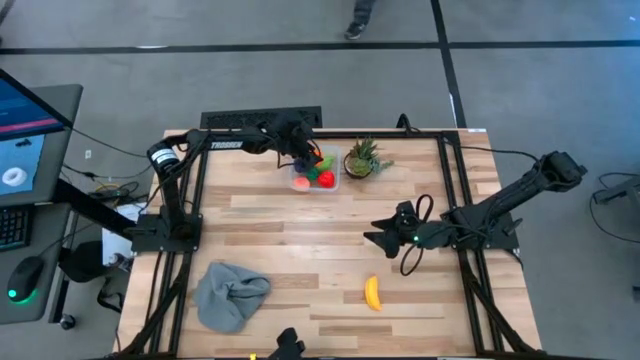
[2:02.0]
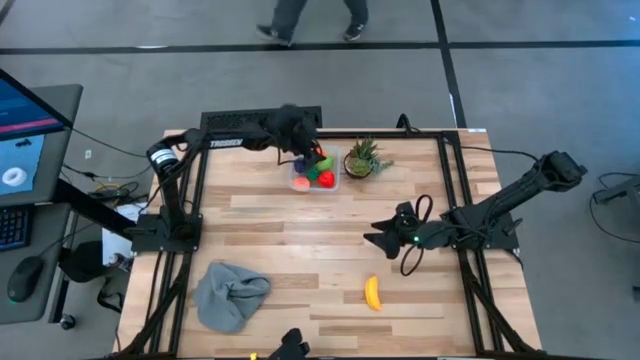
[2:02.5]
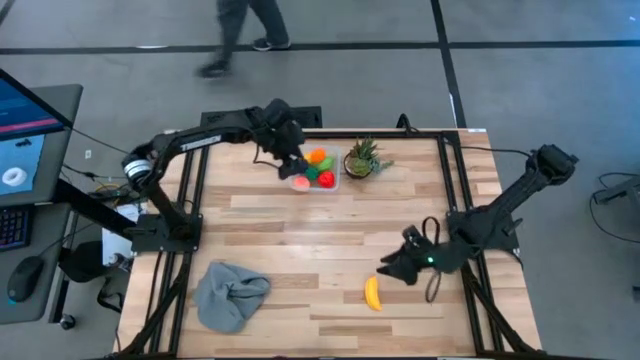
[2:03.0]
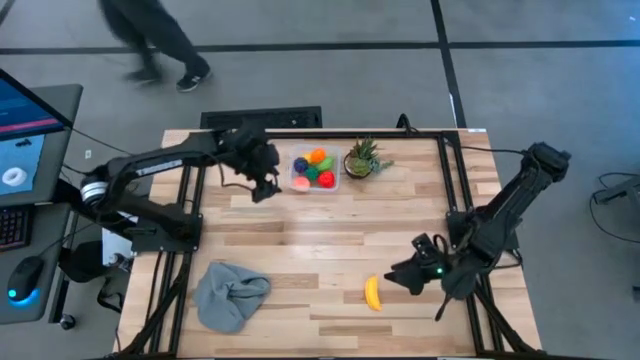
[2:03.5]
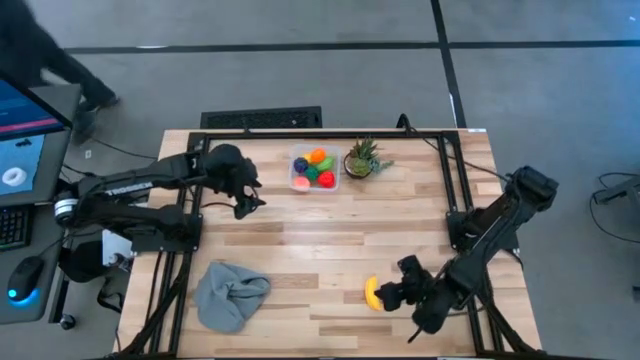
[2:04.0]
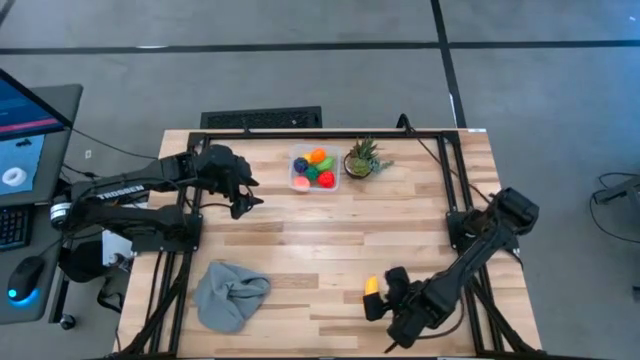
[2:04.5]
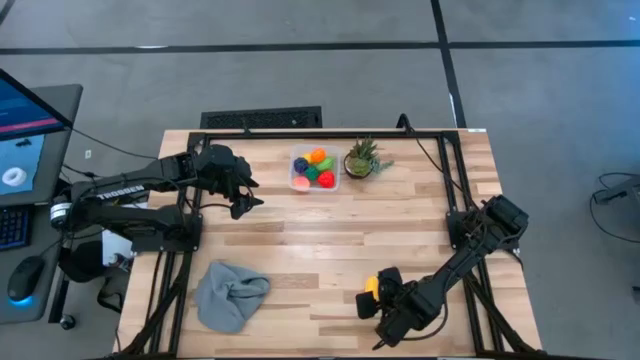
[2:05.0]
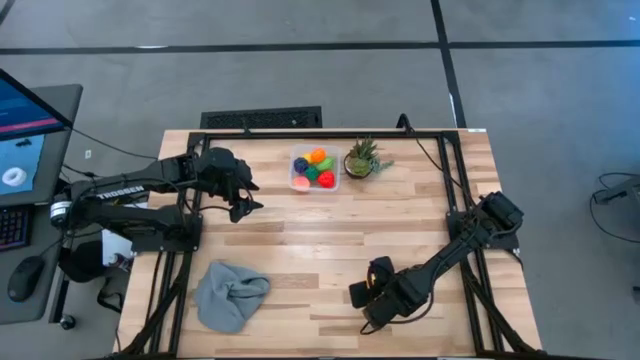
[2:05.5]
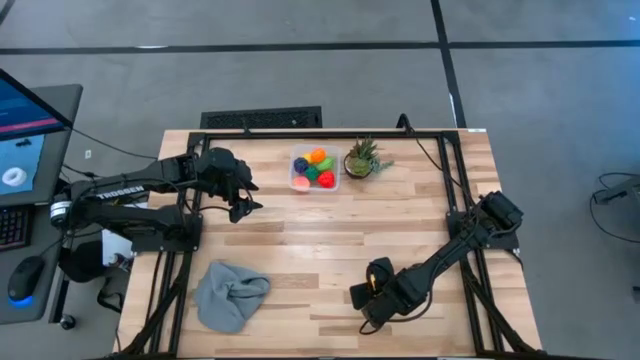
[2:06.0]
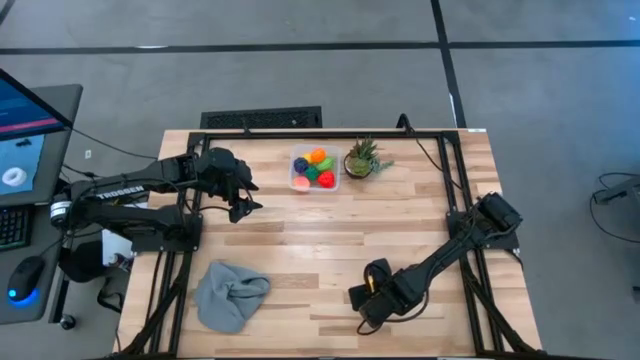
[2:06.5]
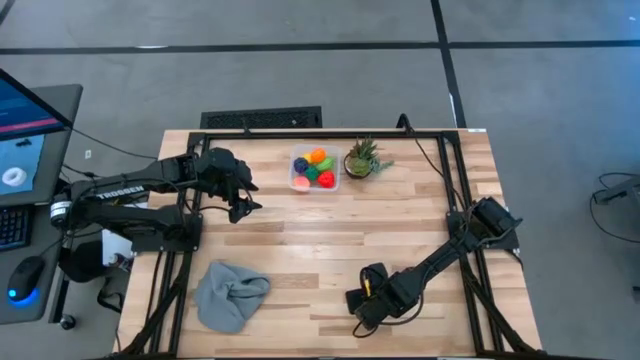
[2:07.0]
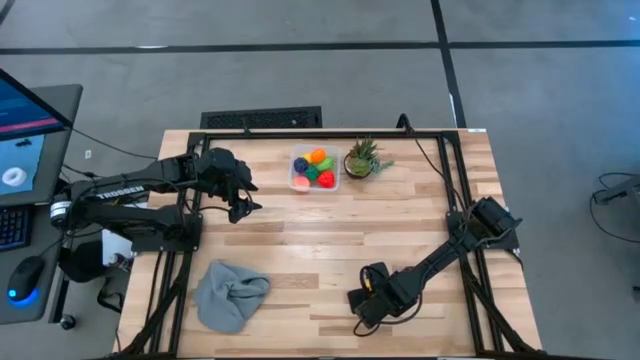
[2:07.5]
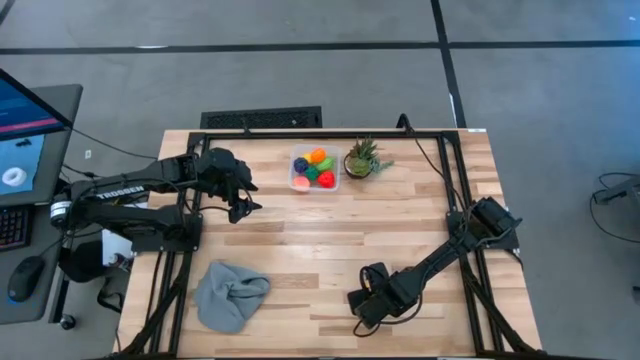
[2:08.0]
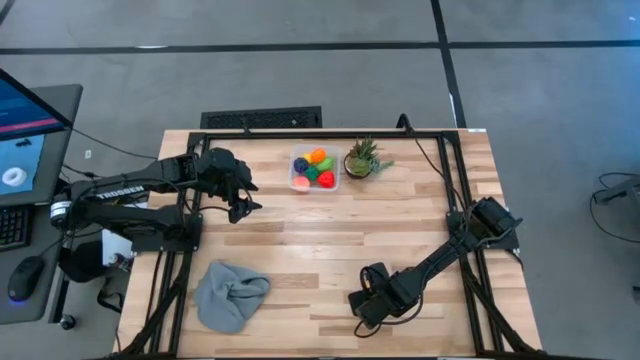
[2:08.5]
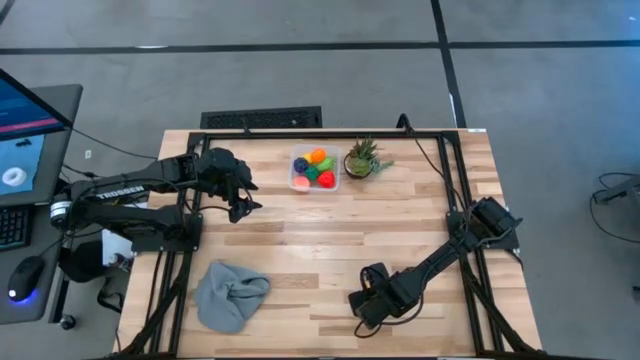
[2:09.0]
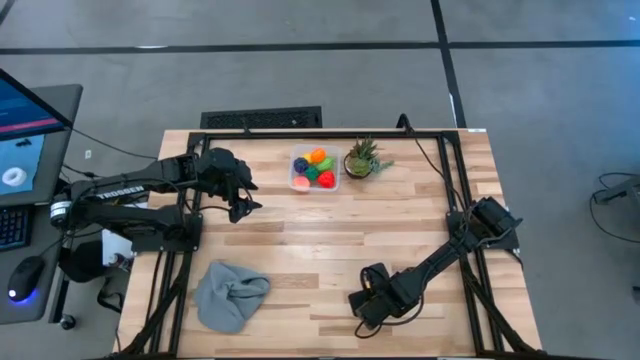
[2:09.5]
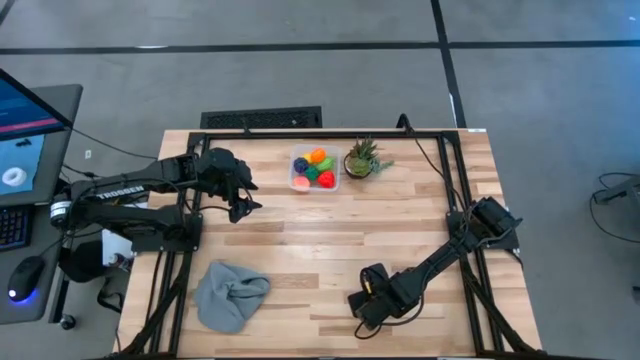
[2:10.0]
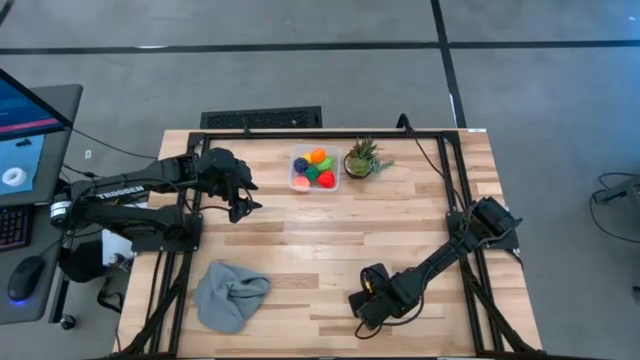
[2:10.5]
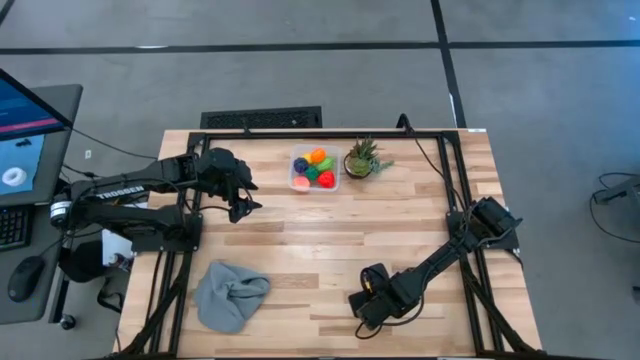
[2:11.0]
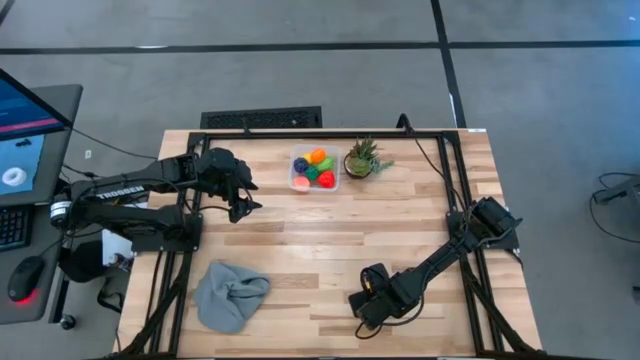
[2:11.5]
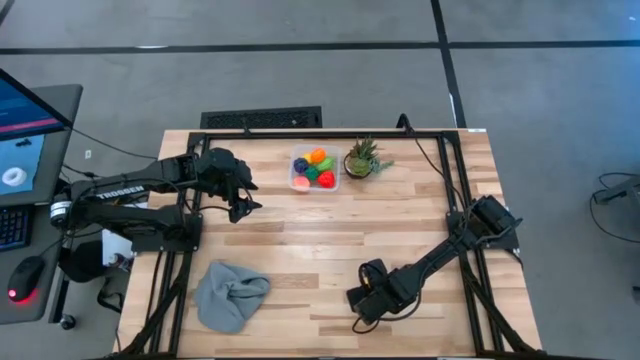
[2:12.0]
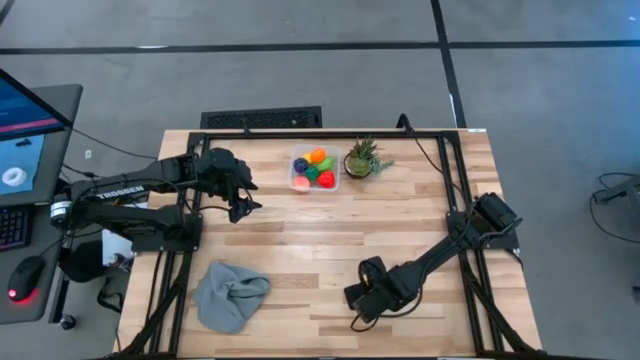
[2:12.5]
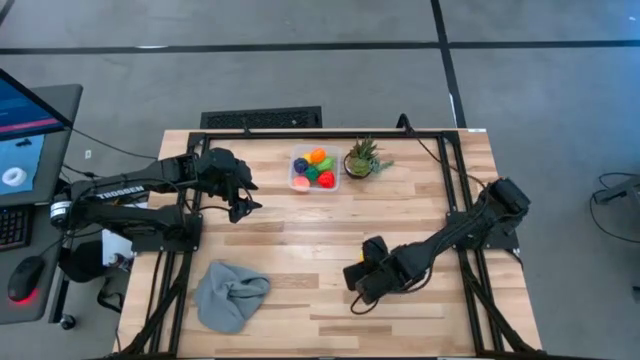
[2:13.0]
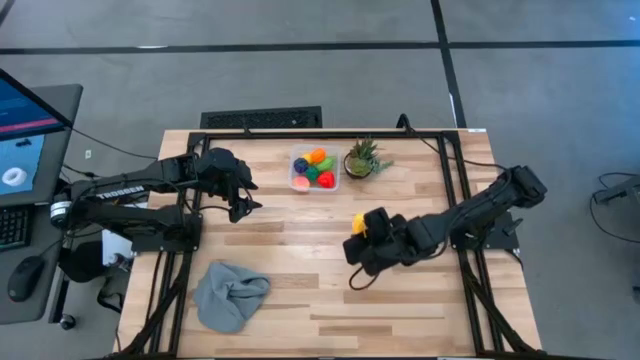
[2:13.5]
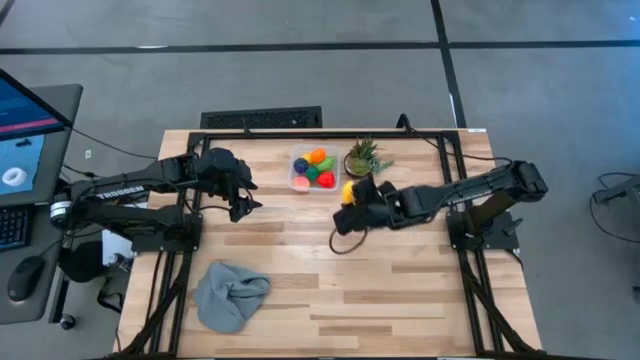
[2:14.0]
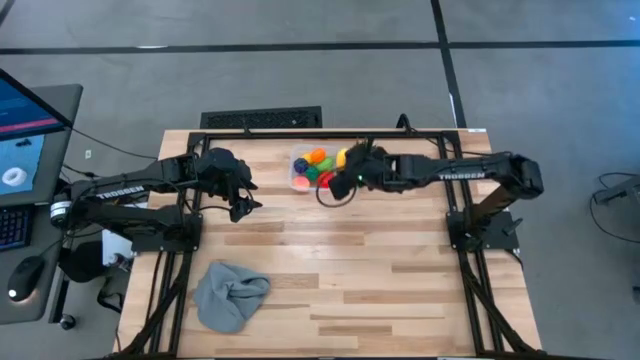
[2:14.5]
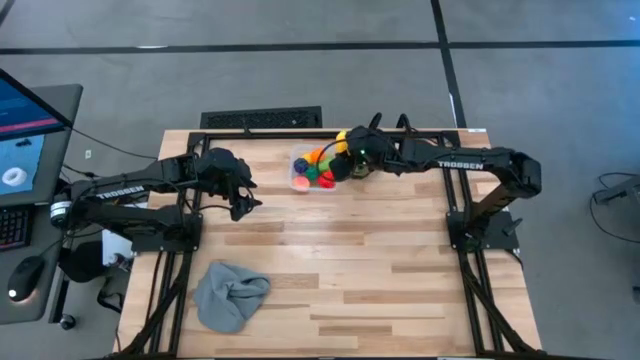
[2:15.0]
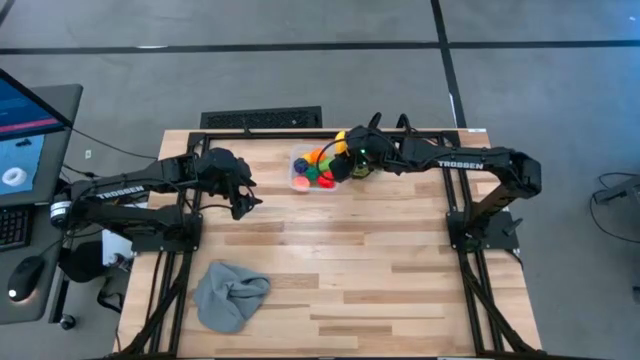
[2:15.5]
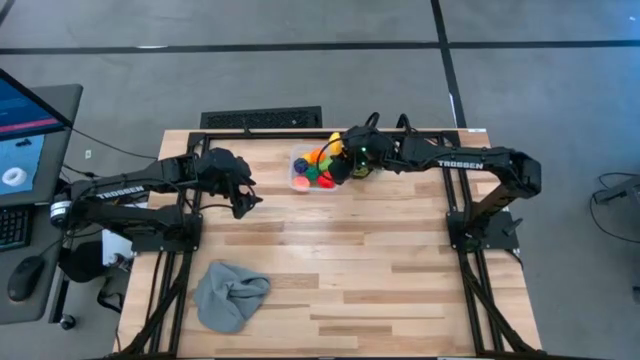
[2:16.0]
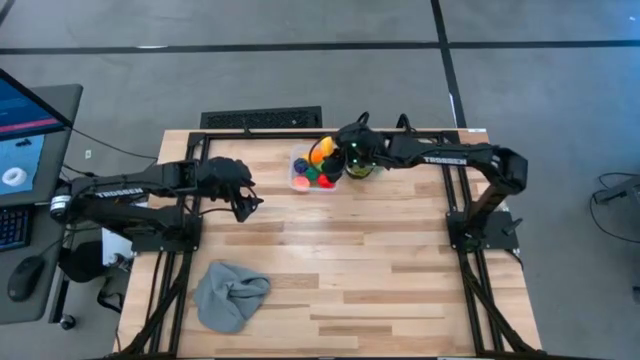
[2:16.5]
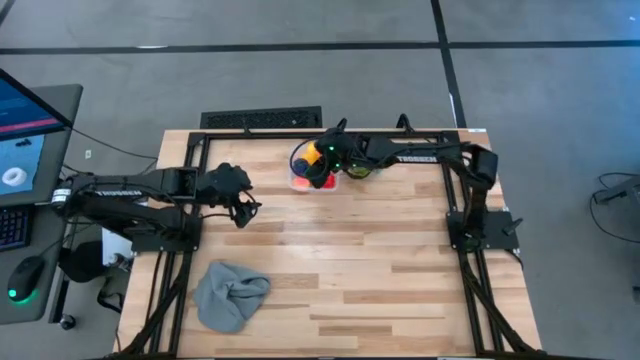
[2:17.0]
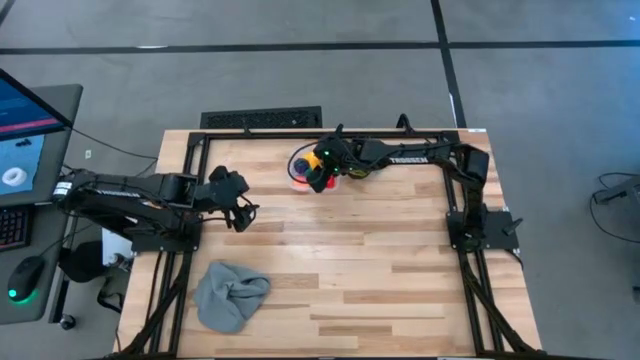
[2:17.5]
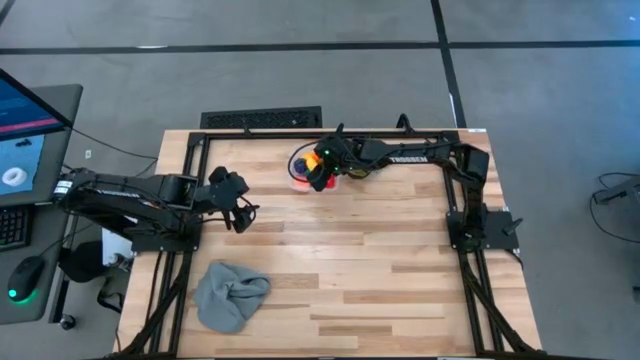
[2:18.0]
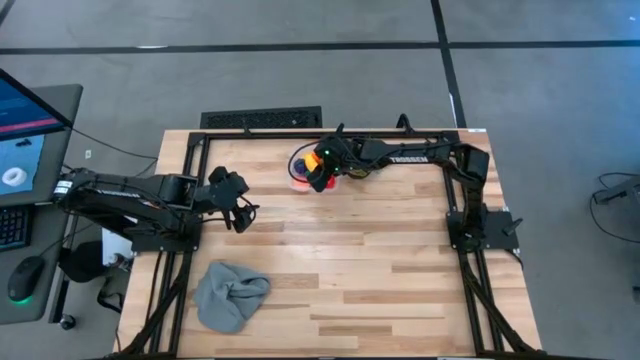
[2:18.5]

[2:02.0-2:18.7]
Task: Pick and placing Produce into tupperware
Put the yellow banana into the transparent container

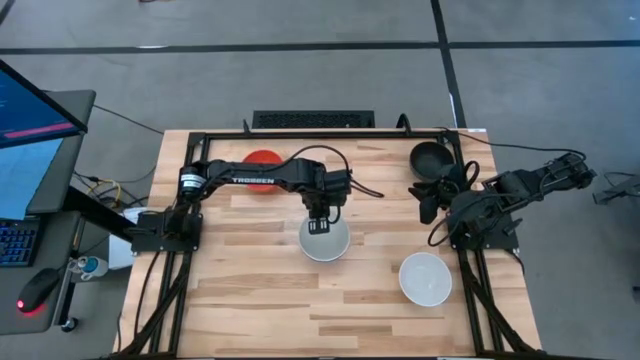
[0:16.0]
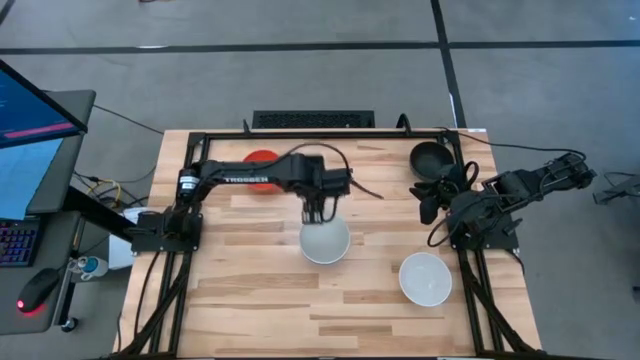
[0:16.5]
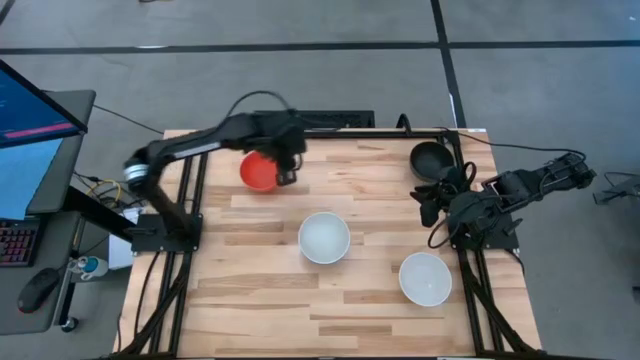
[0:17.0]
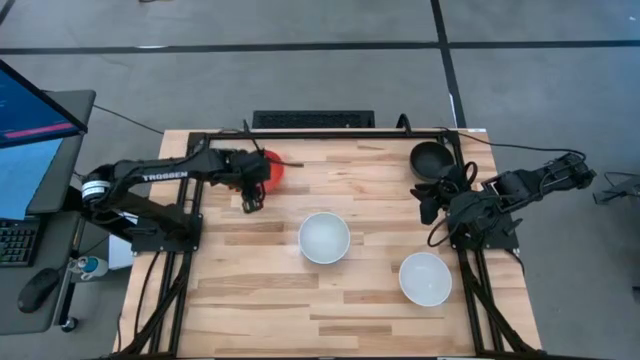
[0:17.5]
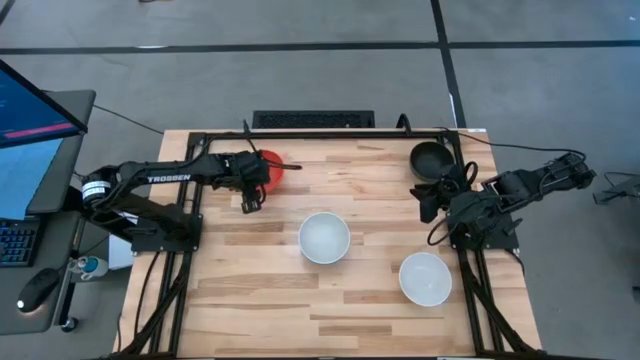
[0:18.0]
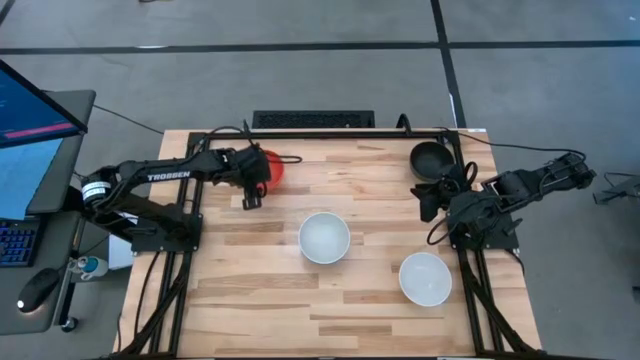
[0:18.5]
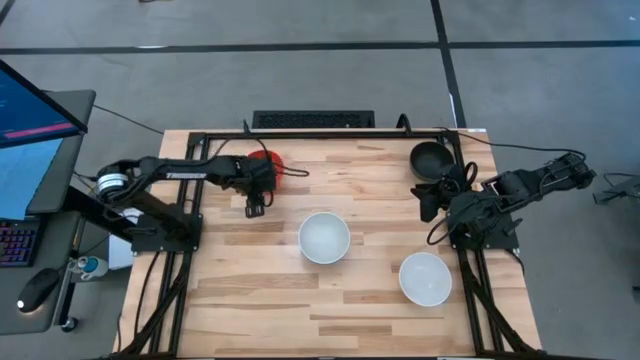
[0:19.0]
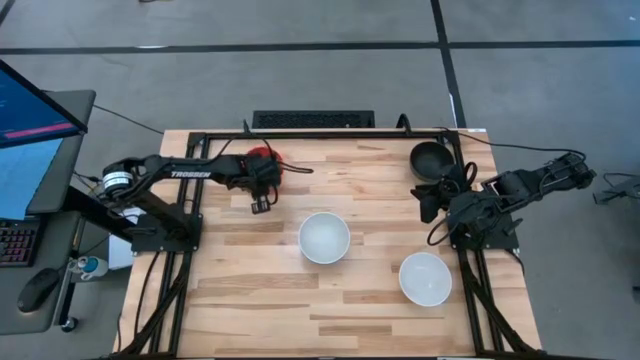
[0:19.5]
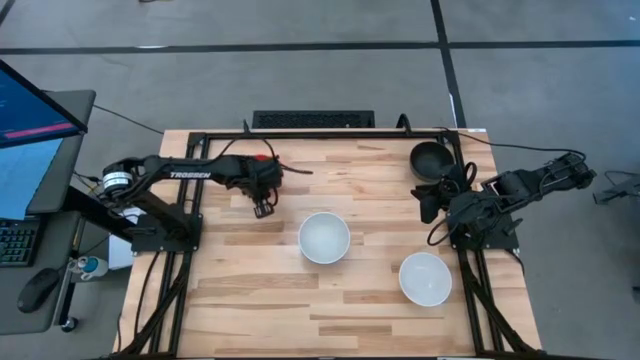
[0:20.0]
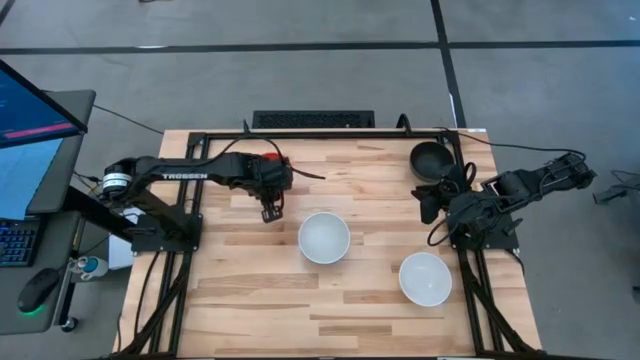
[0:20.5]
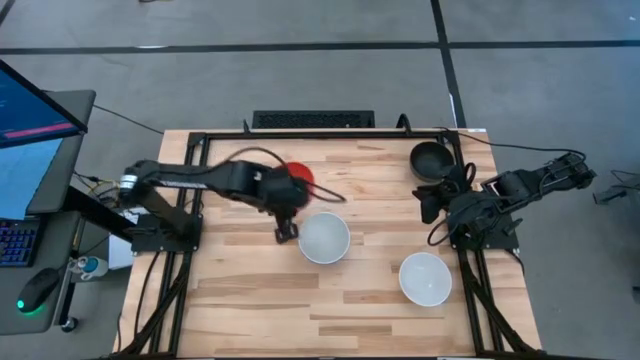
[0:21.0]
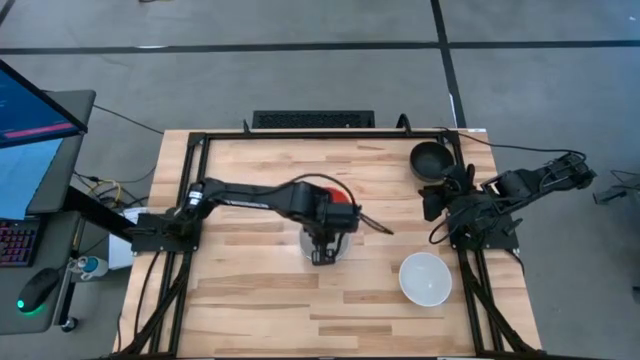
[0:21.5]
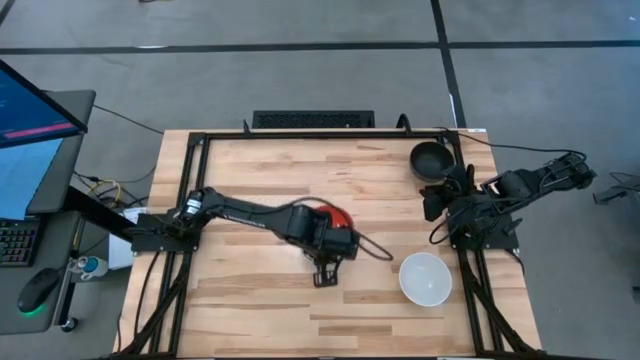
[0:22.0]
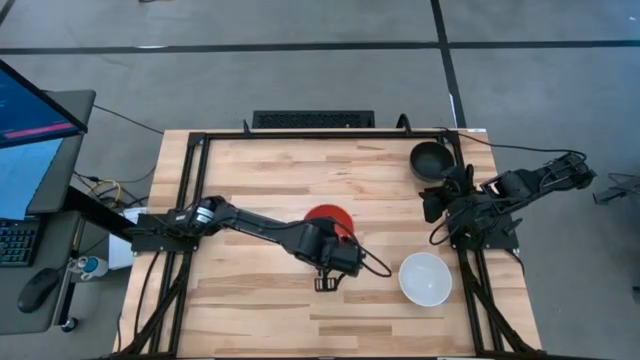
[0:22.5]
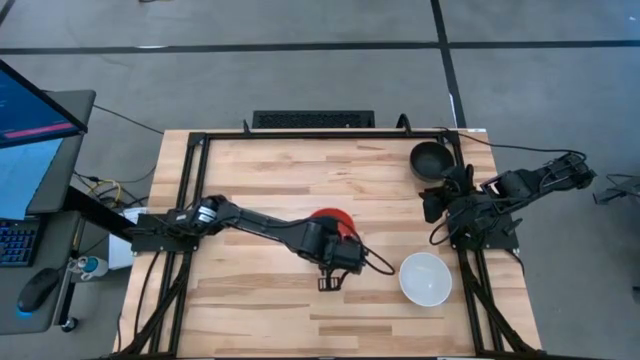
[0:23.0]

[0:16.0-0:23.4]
Task: Nest bowls inside each other
Stack the orange bowl on top of the white bowl
